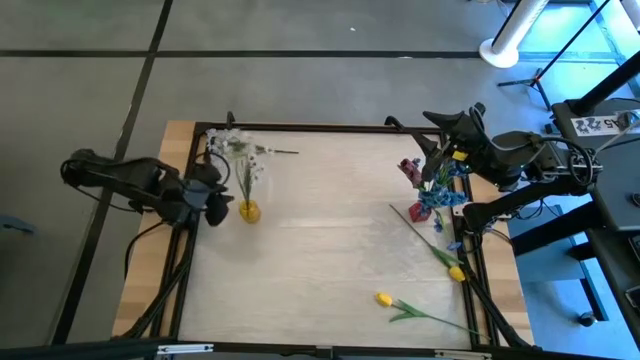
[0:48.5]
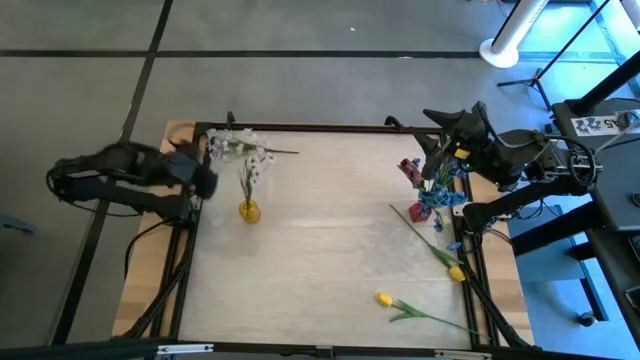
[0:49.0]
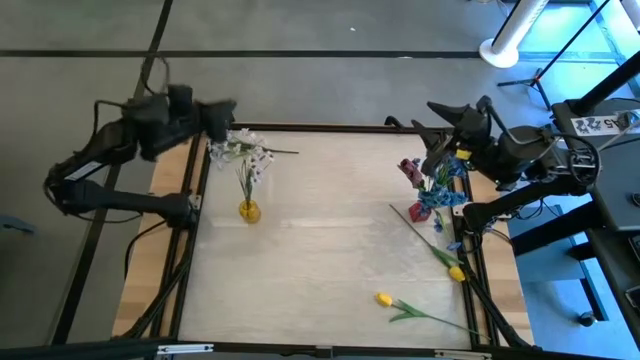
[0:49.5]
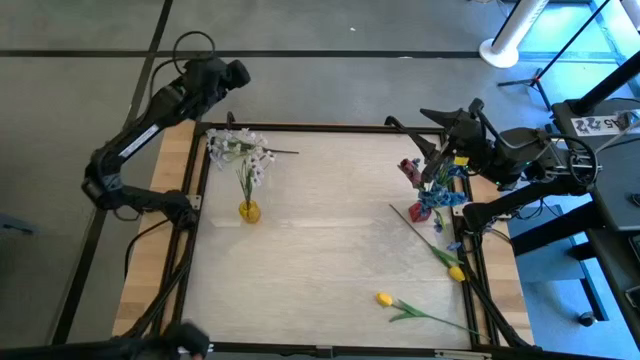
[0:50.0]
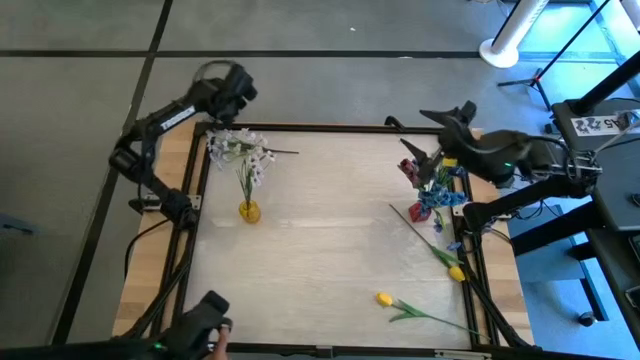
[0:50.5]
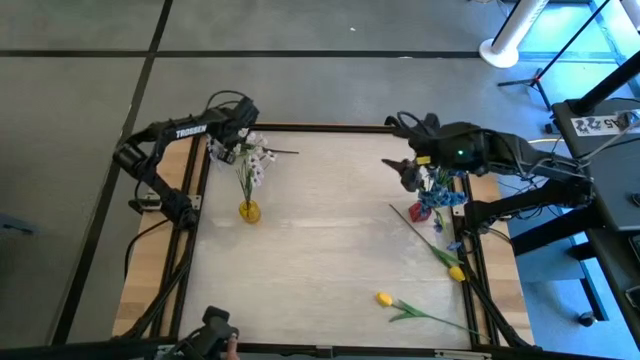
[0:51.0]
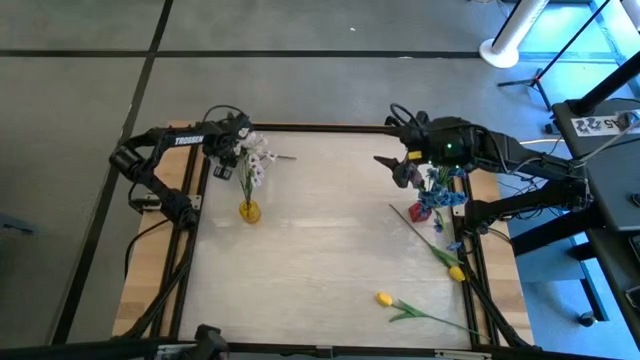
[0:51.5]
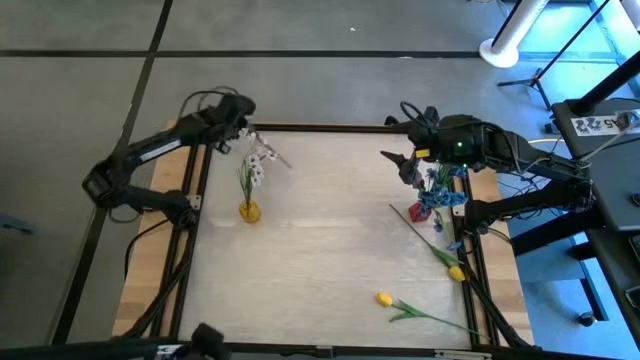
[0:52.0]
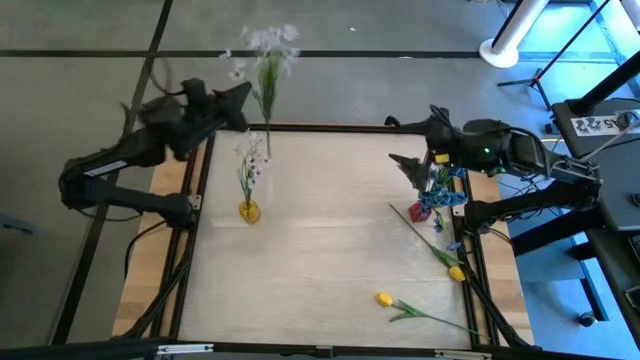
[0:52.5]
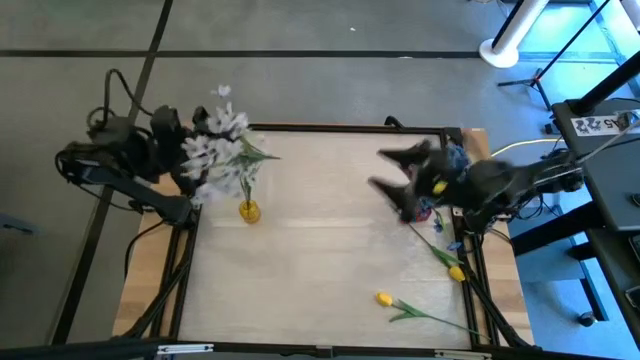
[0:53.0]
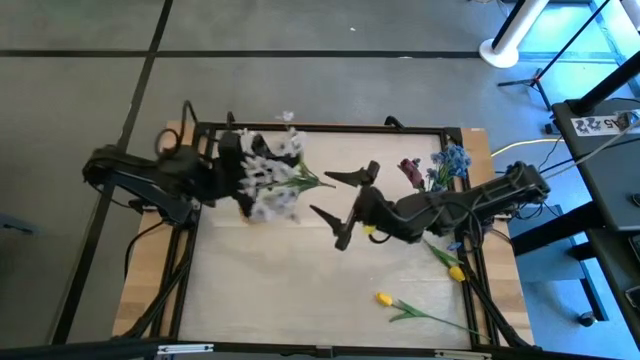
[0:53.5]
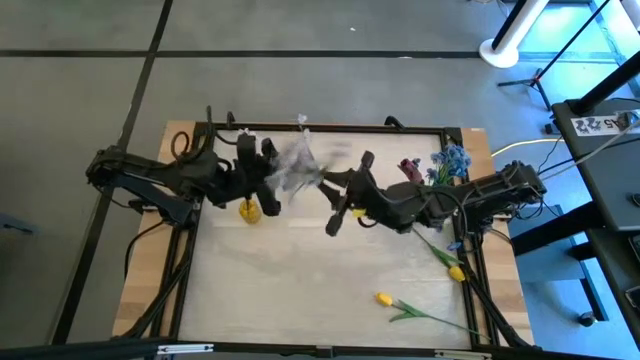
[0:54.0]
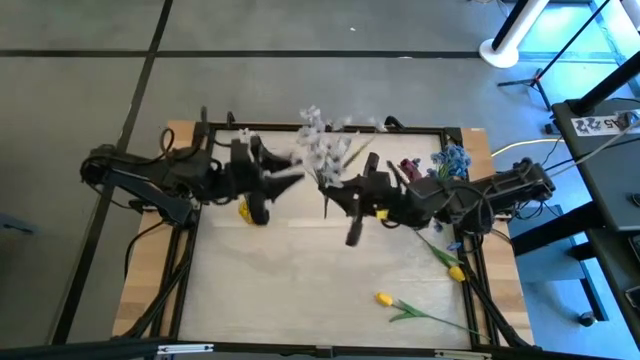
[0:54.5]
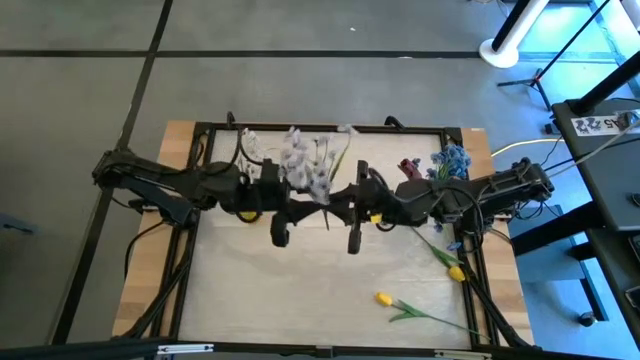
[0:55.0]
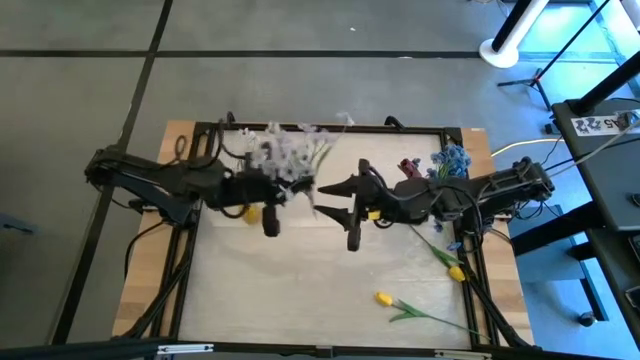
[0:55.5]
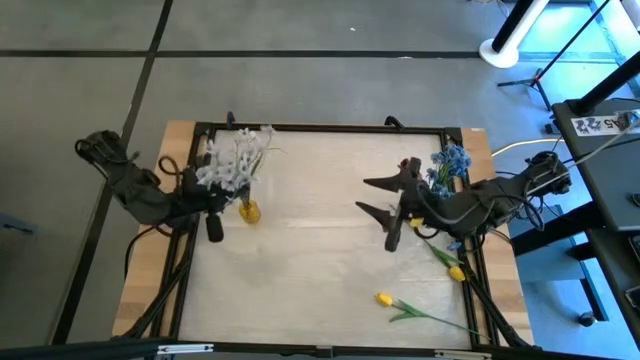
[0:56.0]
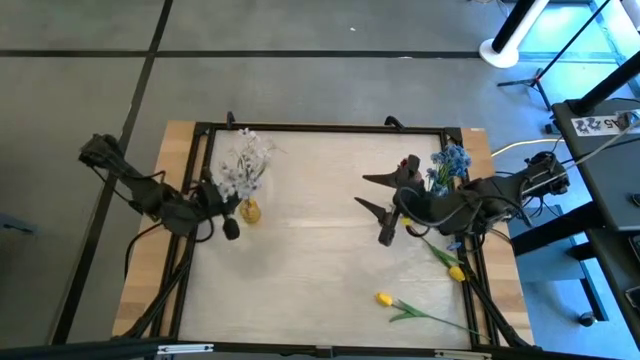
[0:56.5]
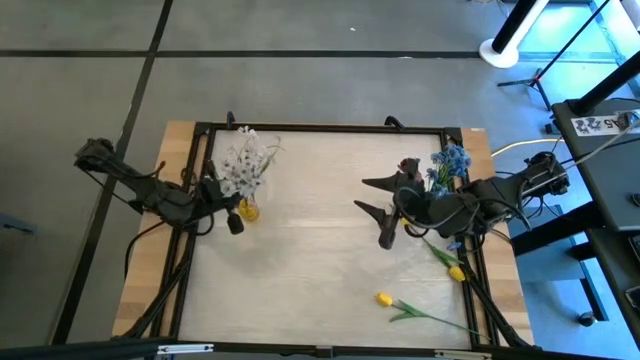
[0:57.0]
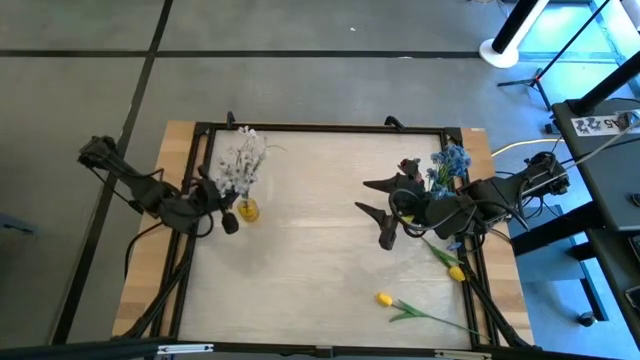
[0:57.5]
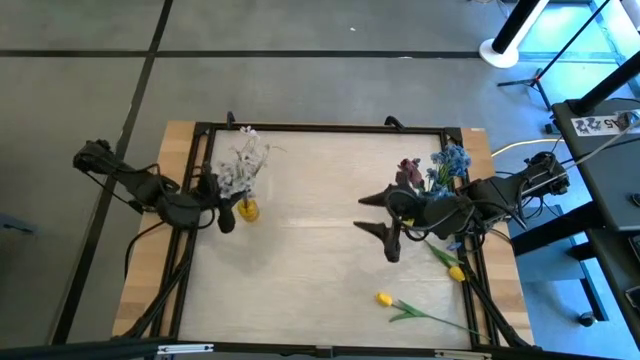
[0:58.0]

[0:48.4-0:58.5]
Task: Sort flowers into vase by color
Put the white flower into the yellow vase

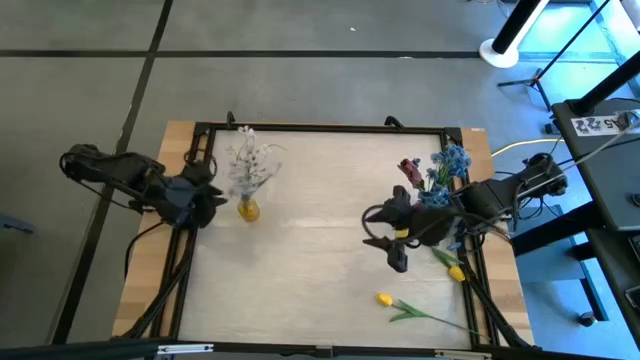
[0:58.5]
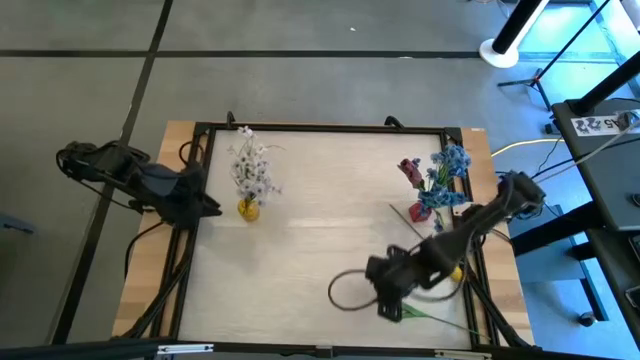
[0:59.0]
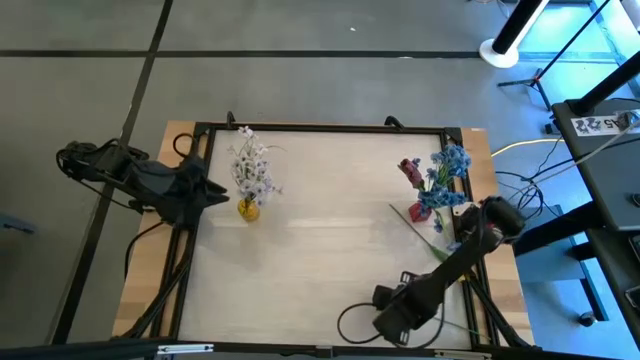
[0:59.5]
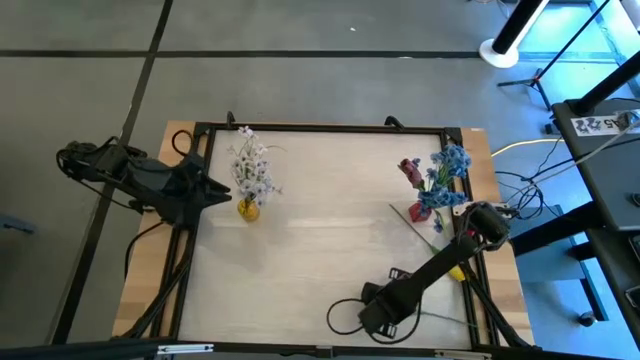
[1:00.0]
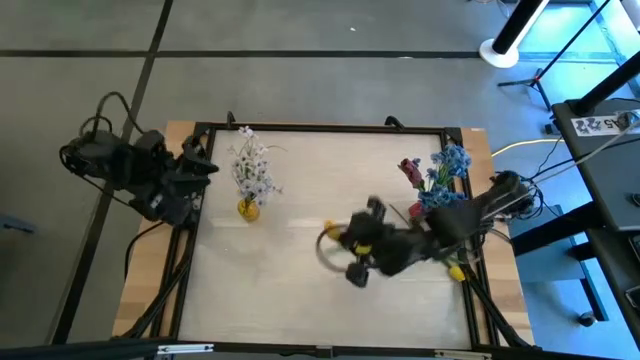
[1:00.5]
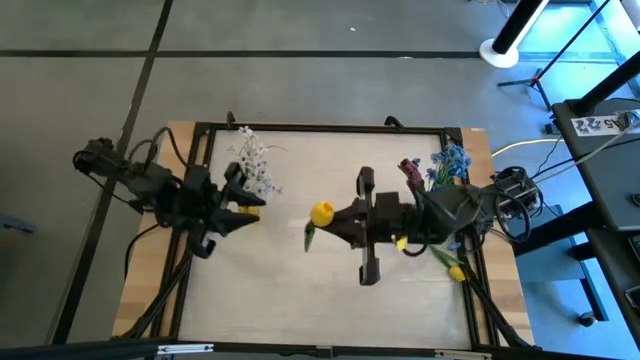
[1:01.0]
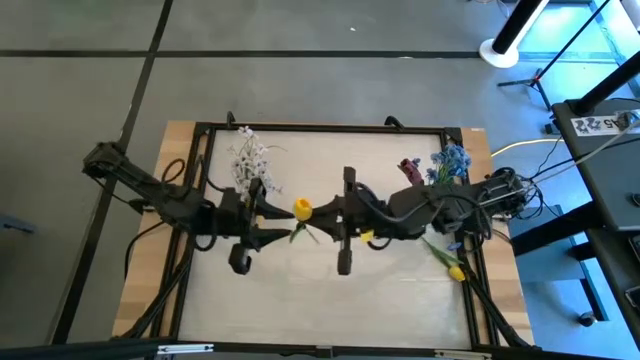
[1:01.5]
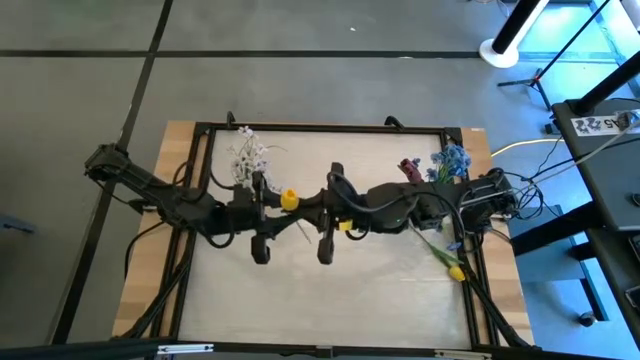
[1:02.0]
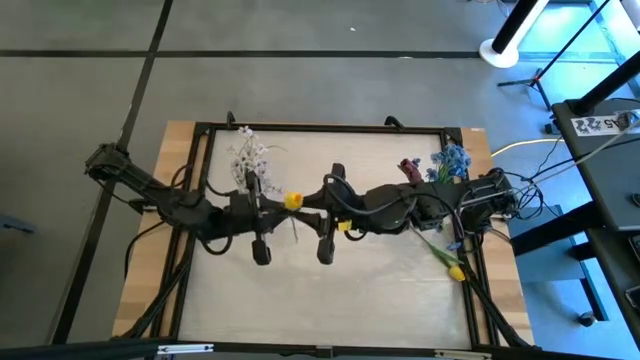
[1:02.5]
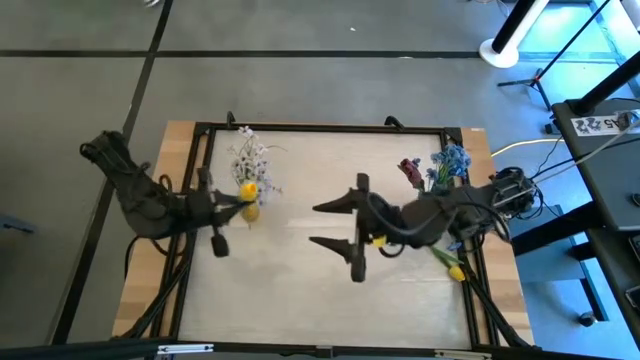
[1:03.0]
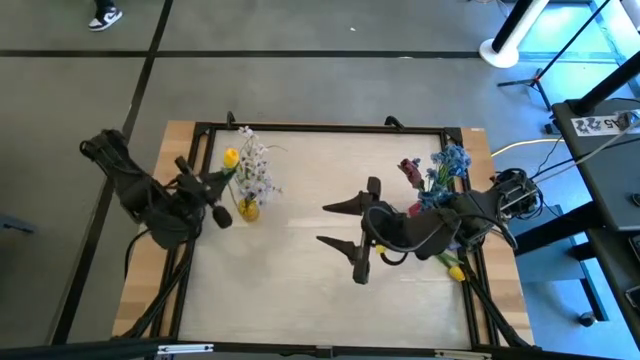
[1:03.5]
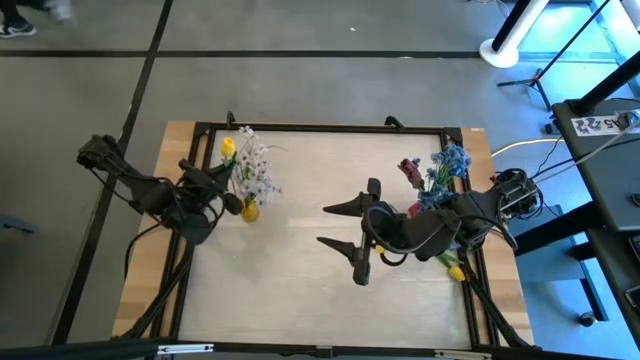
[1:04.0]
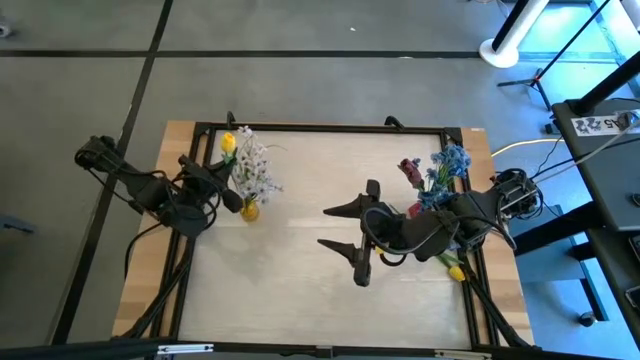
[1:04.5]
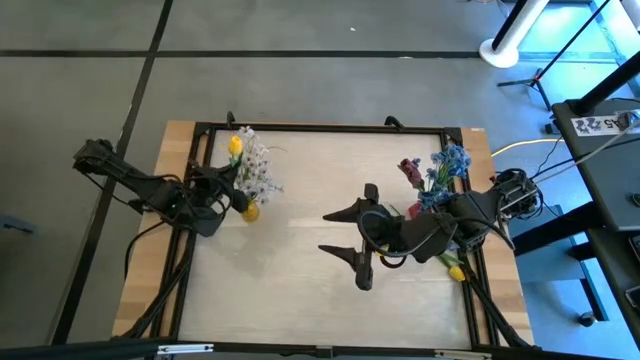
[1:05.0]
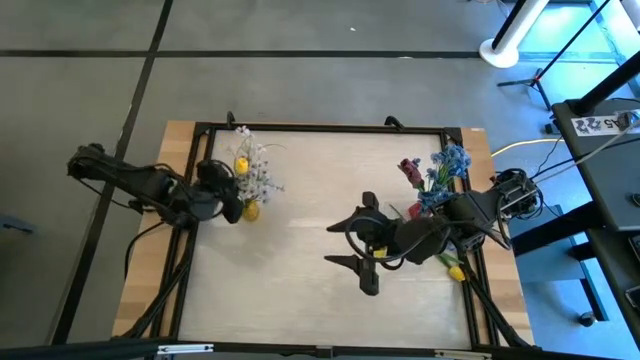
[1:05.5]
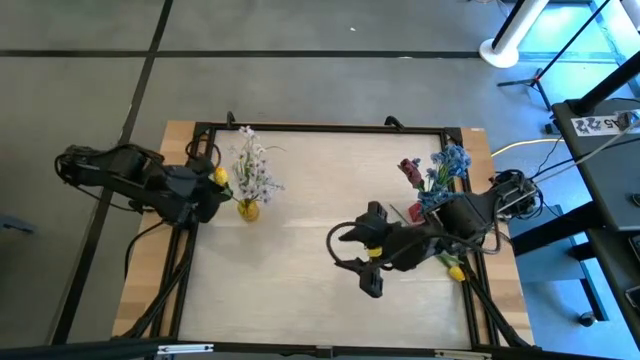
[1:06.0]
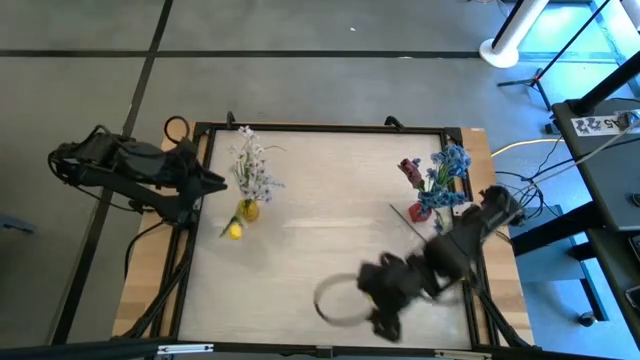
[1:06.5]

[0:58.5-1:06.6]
Put the bottom yellow flower into the yellow vase

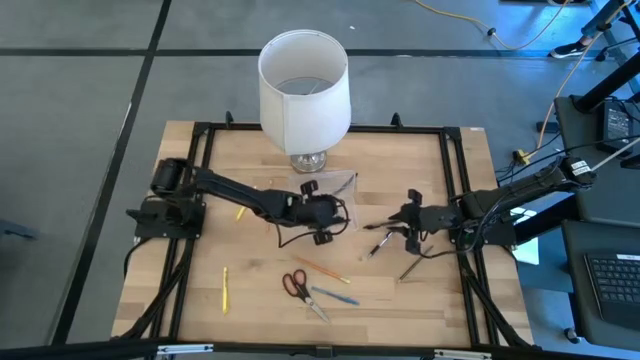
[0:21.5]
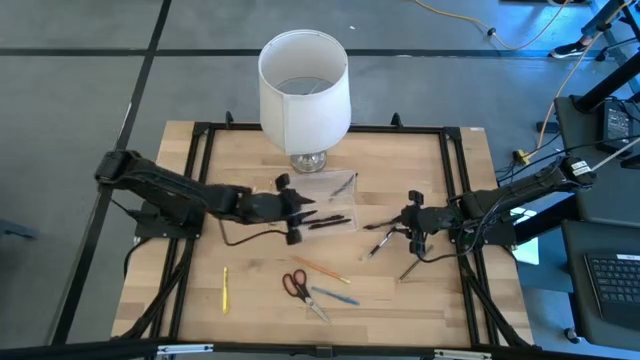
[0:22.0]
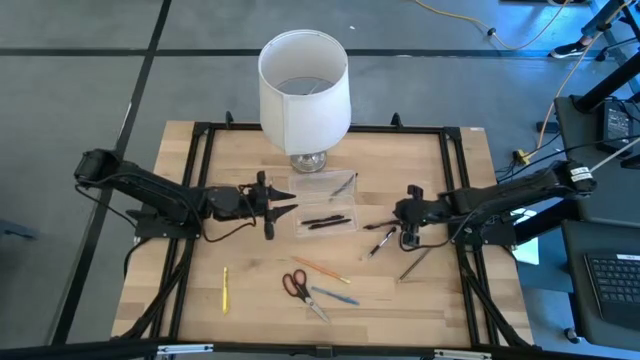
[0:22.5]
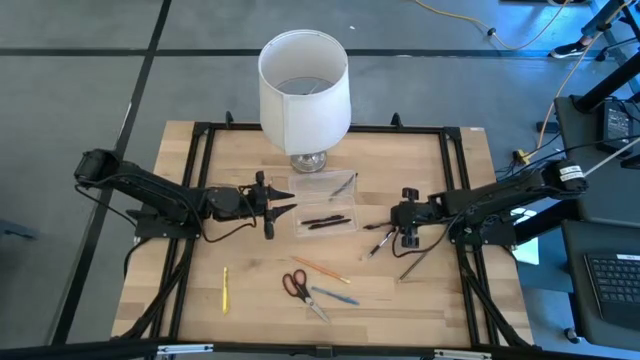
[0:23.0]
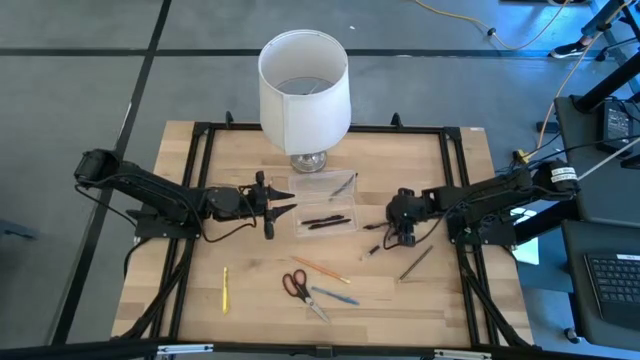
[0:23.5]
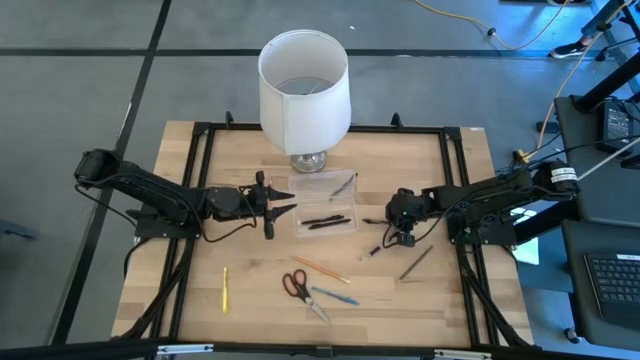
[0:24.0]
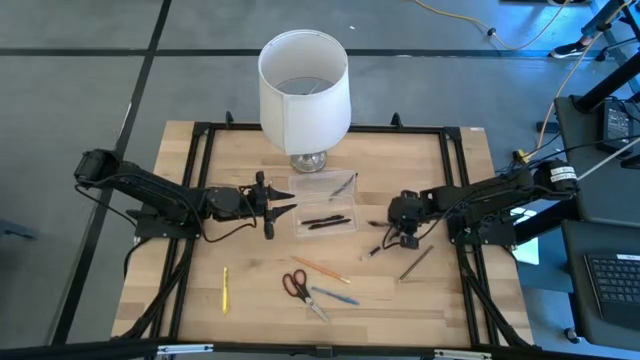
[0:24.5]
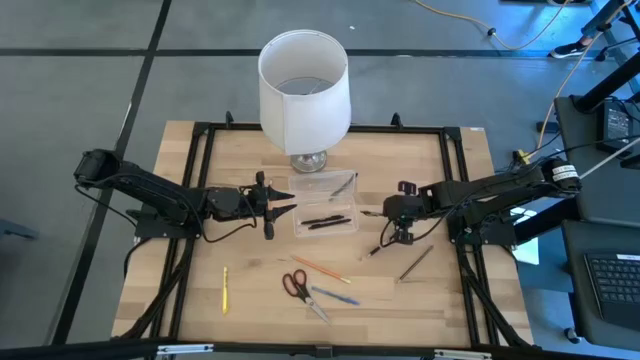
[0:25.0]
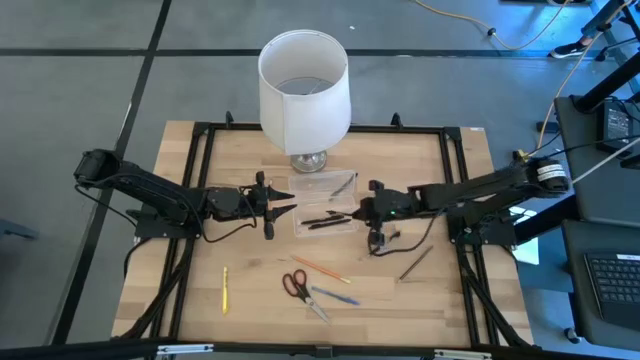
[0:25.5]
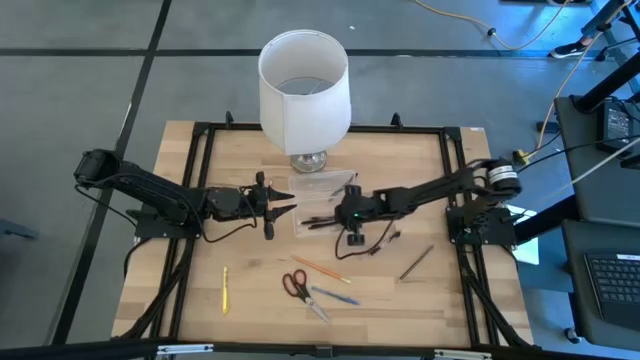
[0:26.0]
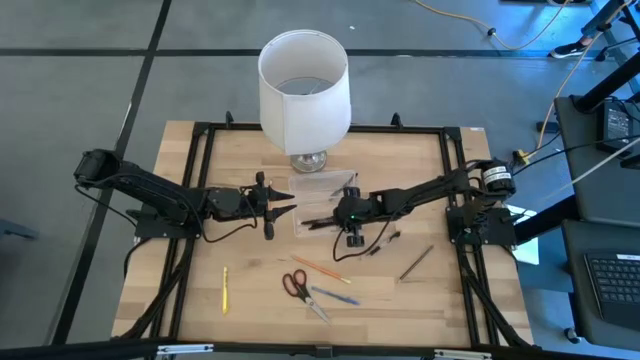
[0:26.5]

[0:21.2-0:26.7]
Task: Pick & place school supplies into a supply box
Put the black pen into the transparent supply box
